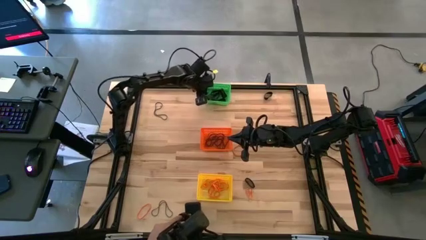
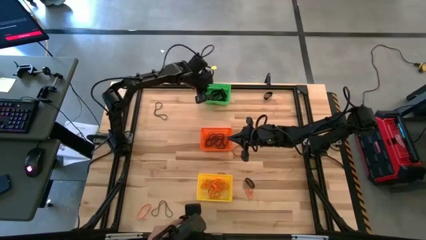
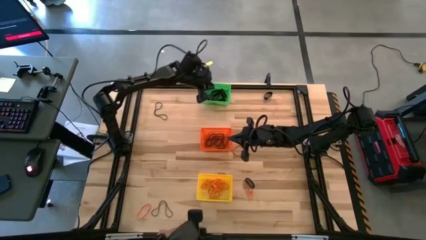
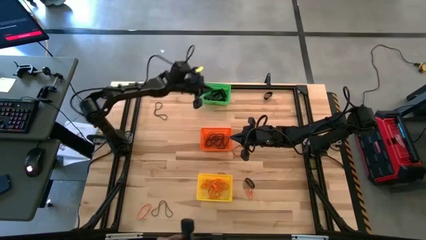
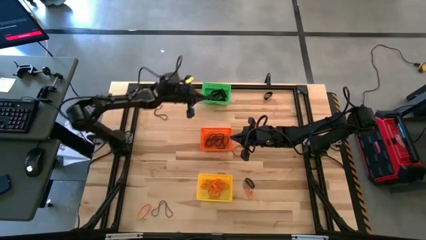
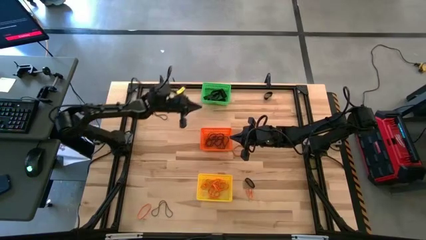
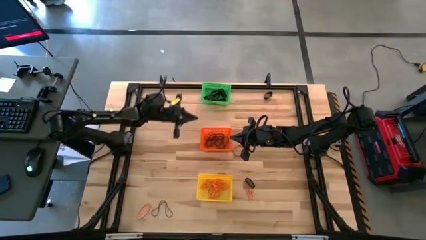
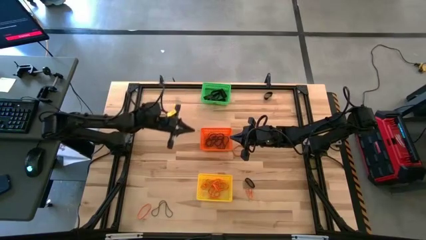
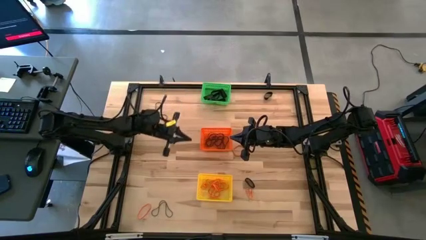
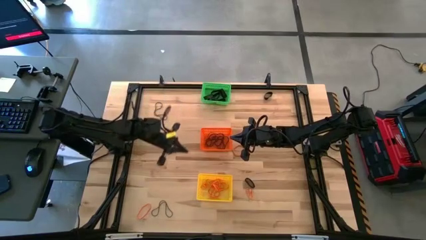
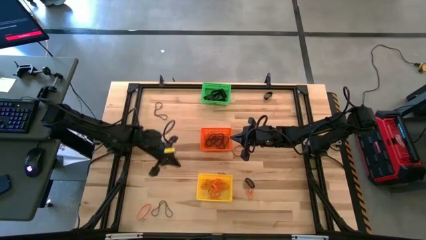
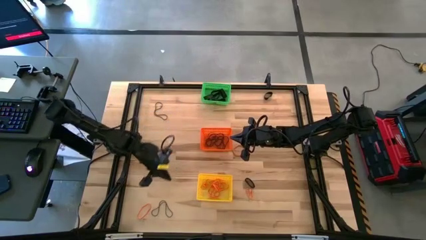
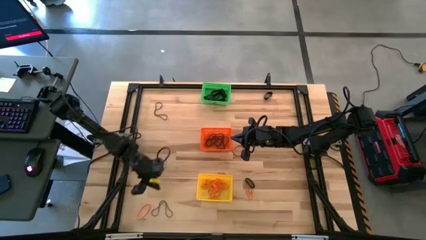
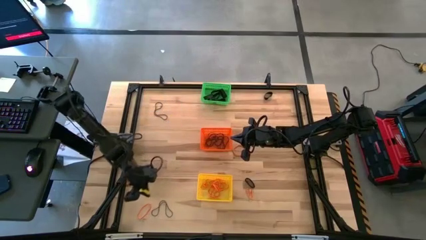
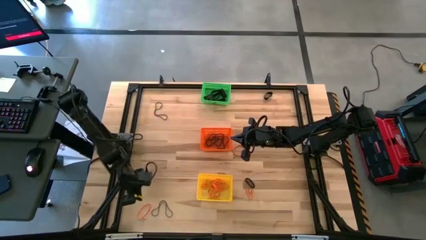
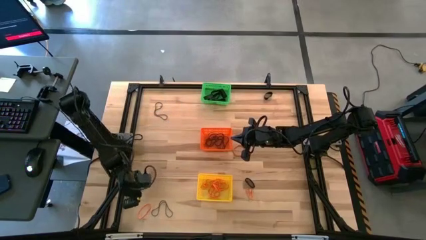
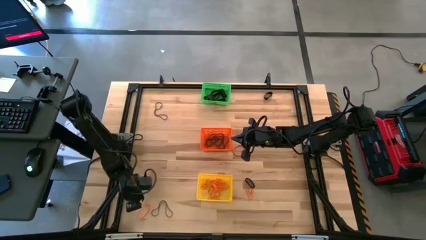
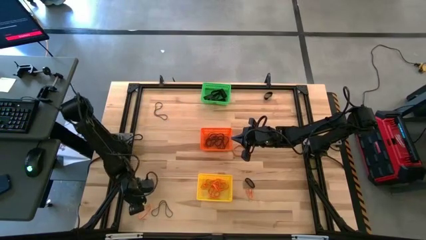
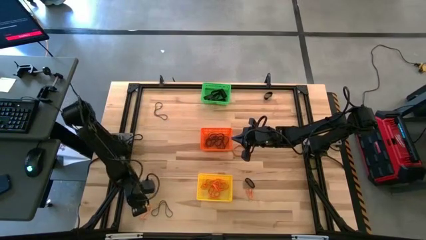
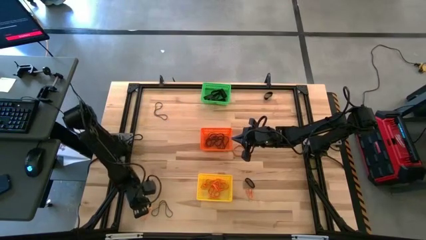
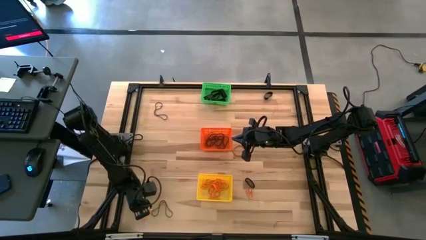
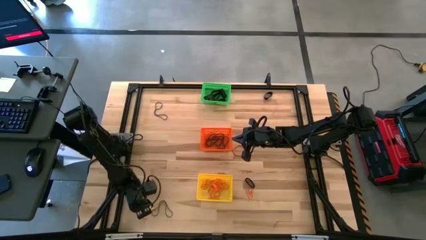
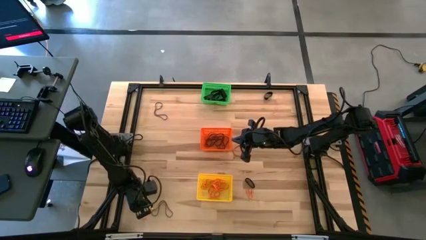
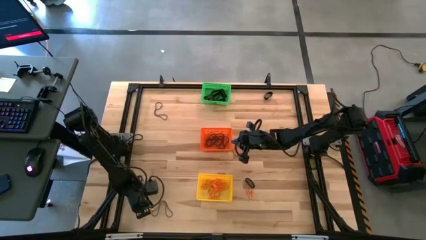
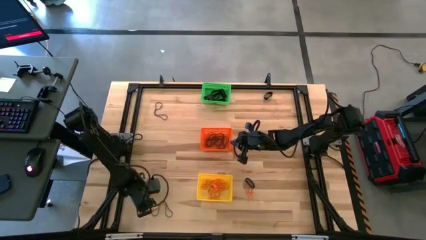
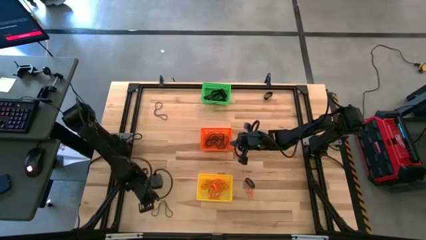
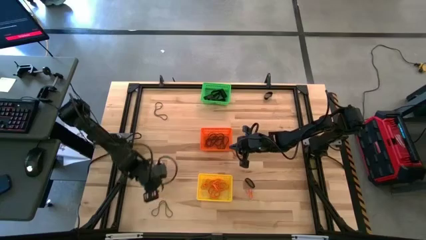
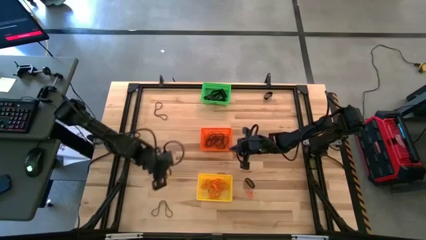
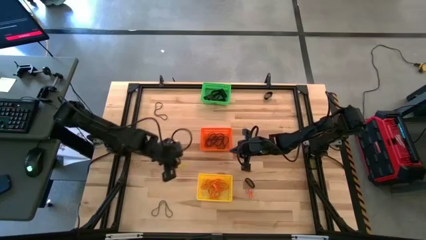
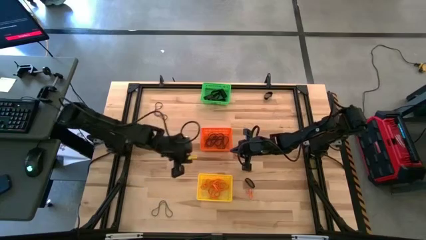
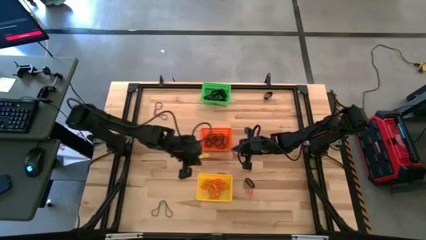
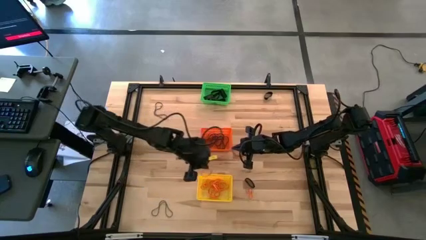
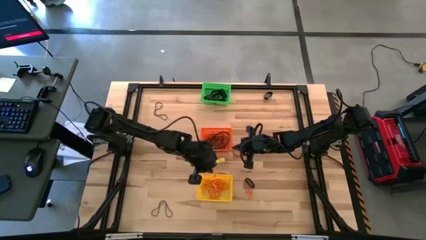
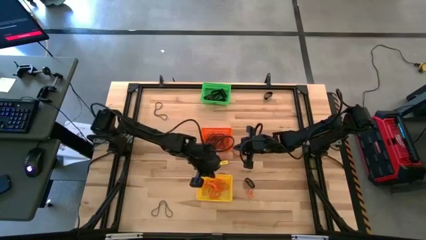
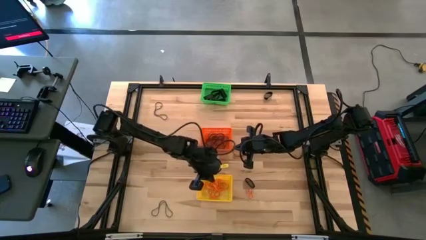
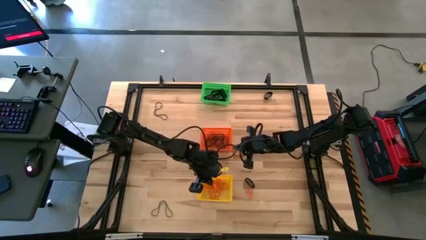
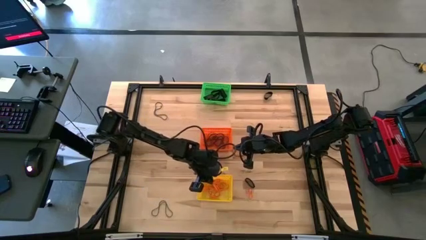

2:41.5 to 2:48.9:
Task: Sort rubber bands into baskets
Put the orange rubber band into the yellow bin

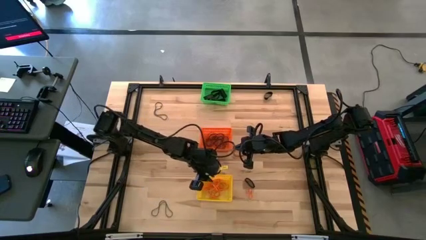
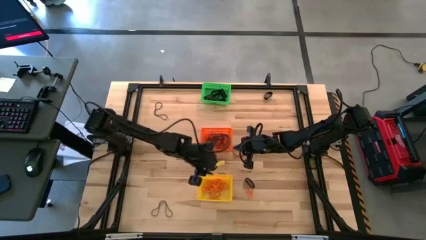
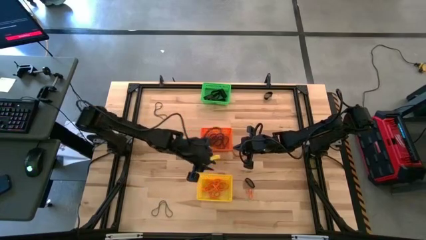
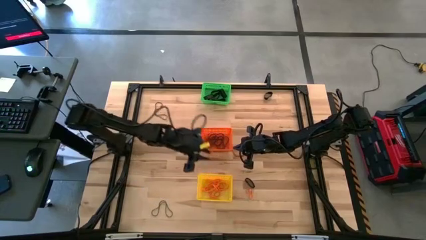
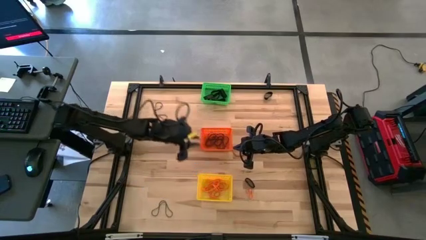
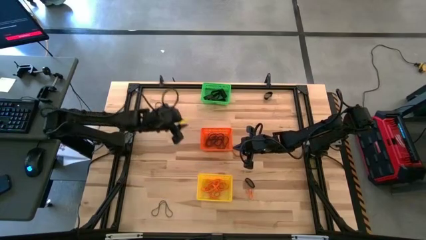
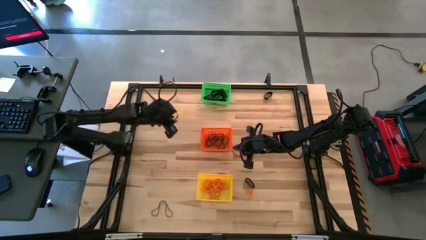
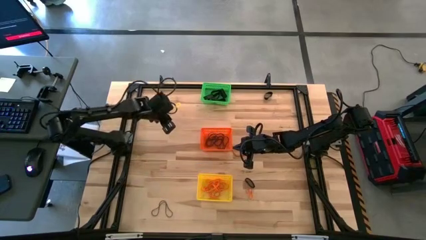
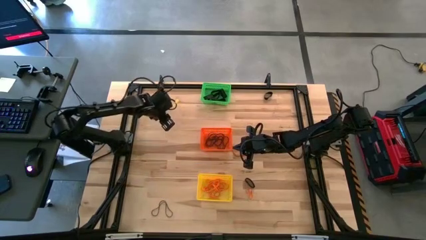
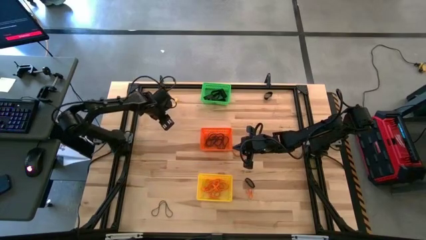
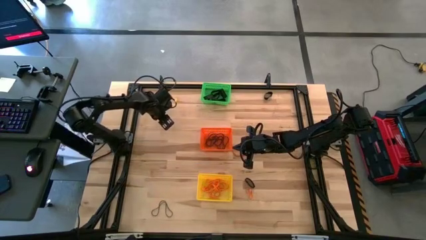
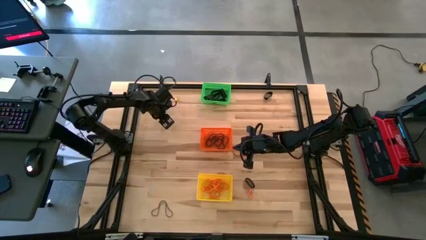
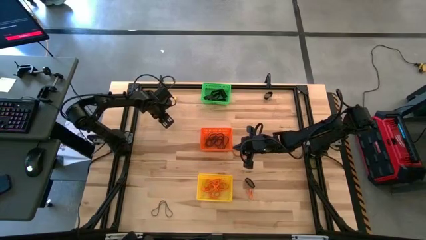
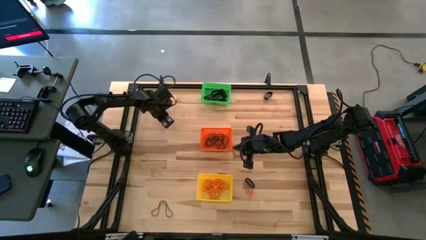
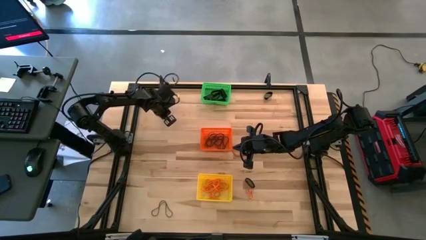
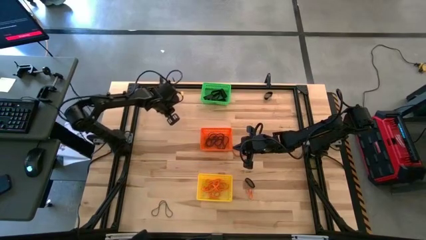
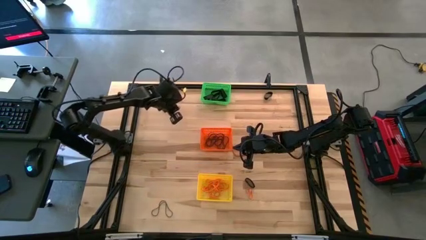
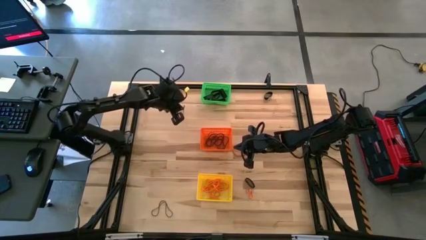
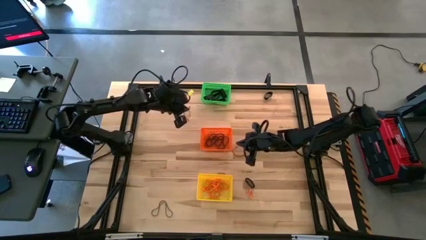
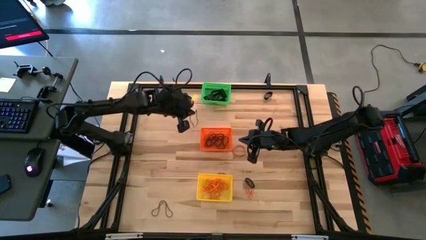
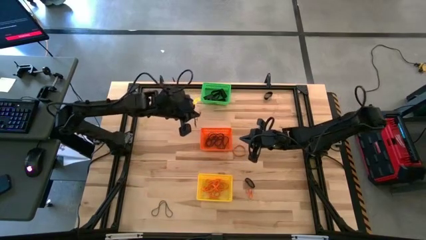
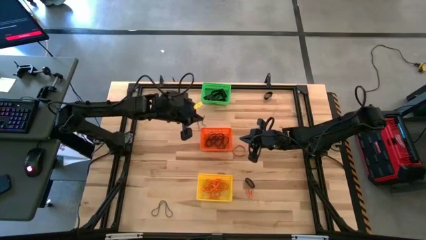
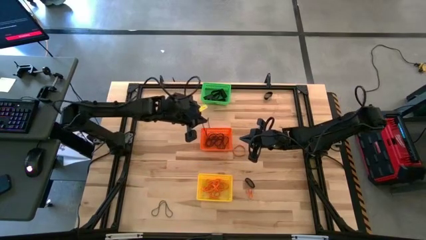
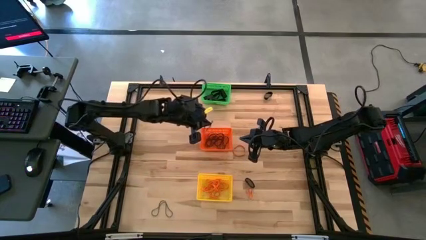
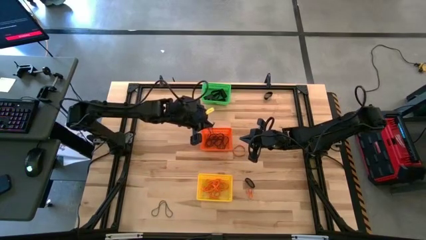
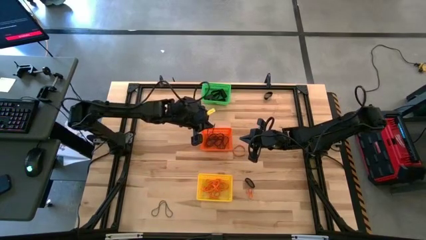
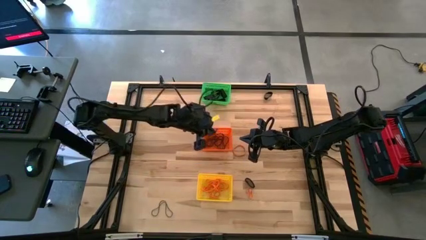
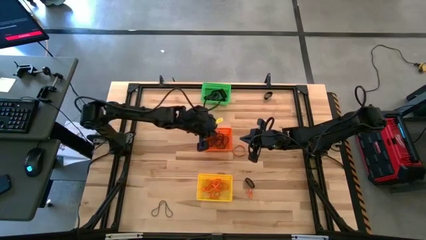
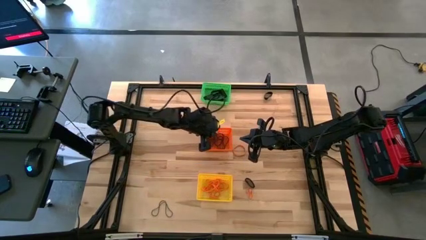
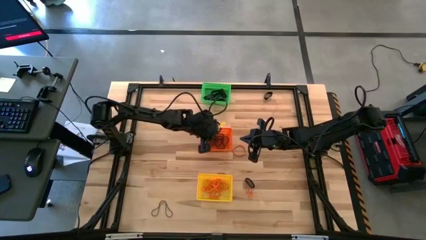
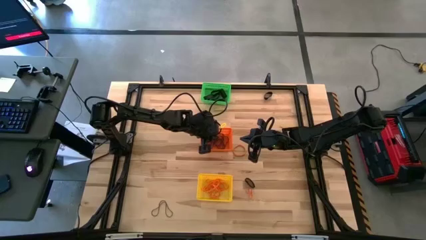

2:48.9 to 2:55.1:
Put the purple rubber band into the orange bin

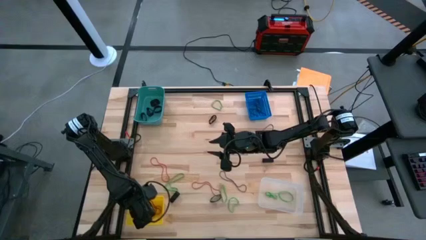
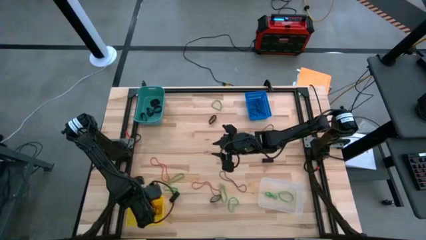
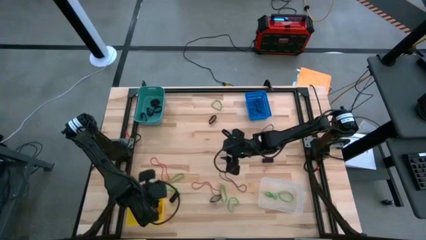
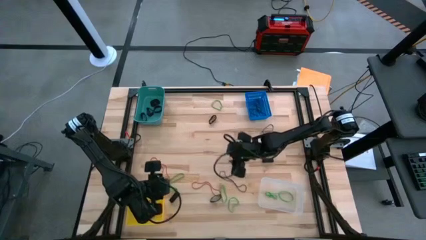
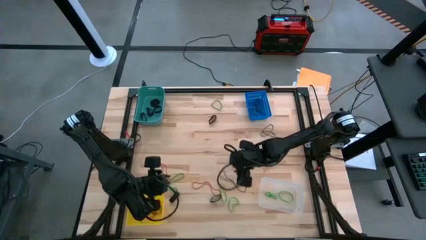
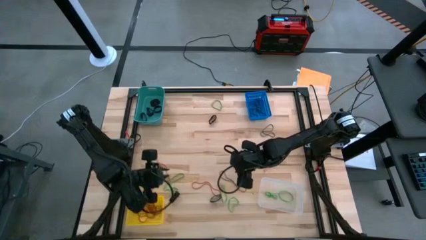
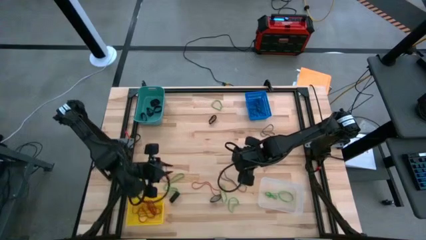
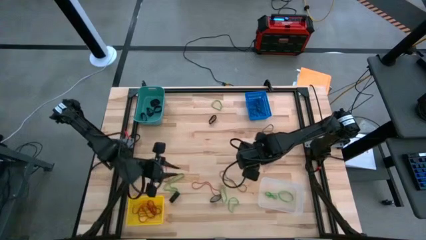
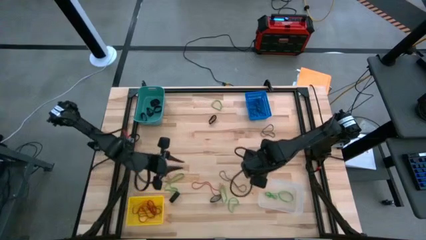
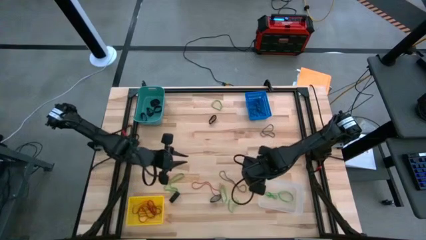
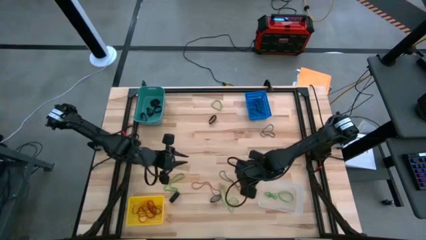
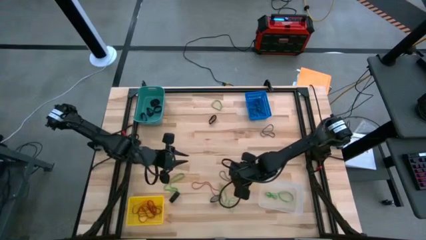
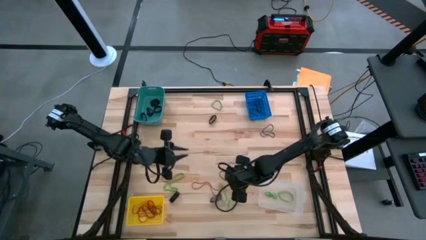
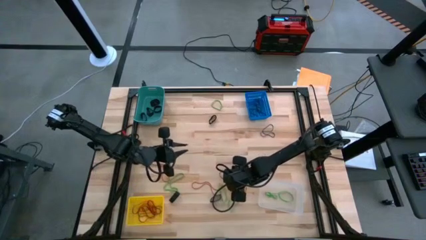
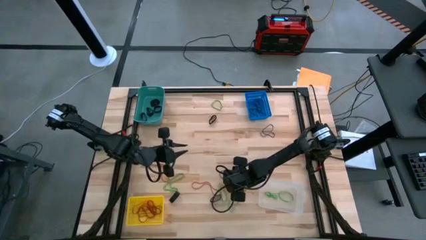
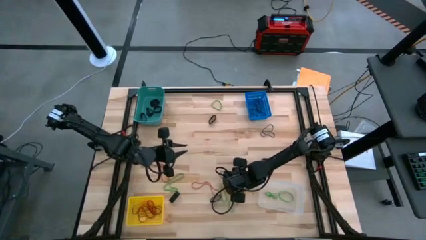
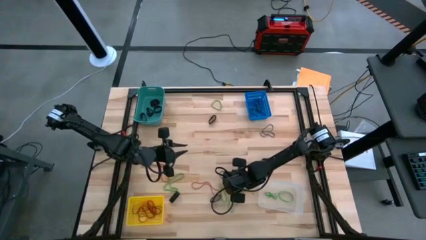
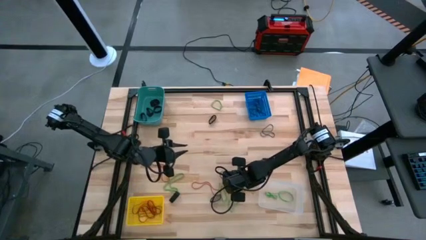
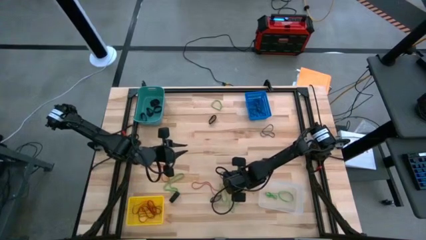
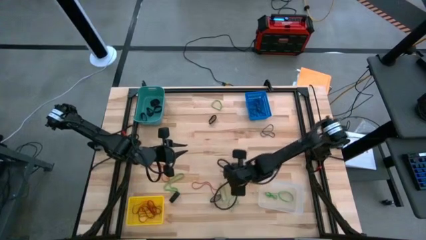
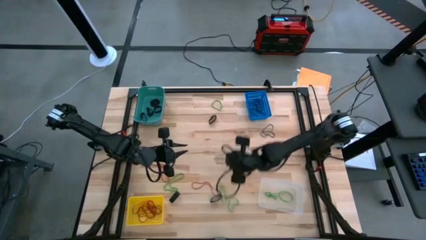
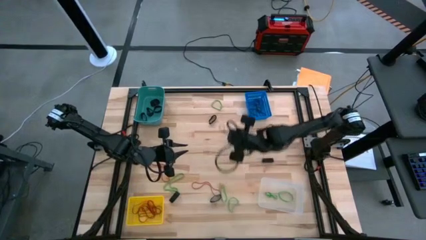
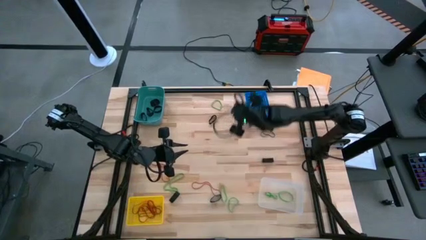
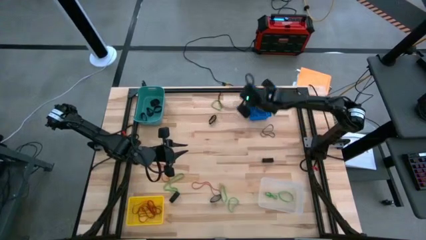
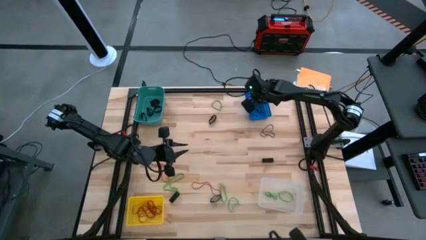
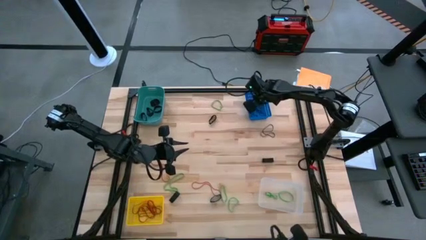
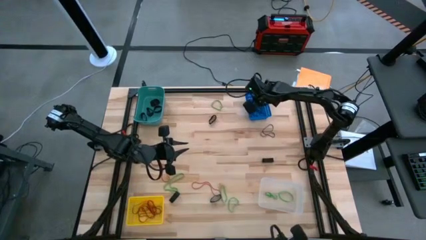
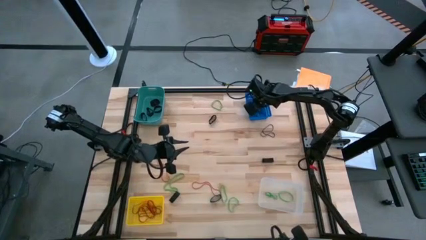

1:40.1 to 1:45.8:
Task: Sort rubber bands into baskets
Put the thin black rubber band into the blue basket
